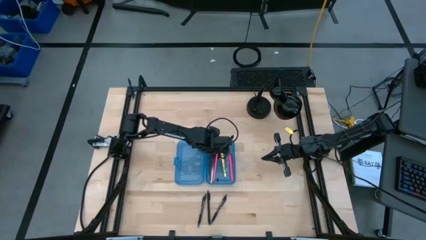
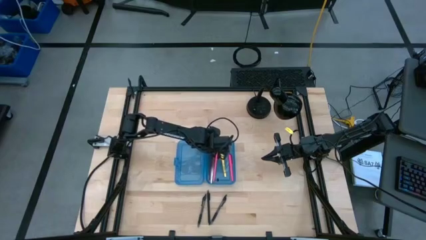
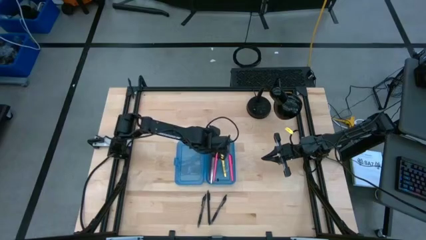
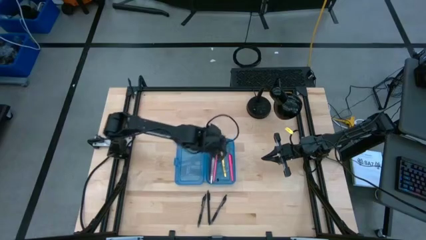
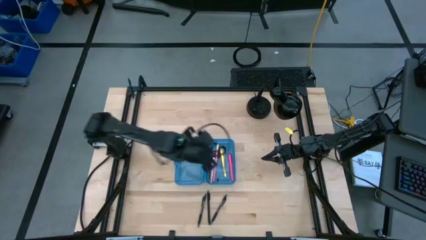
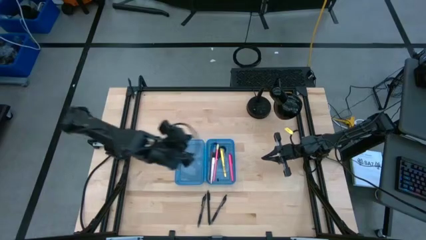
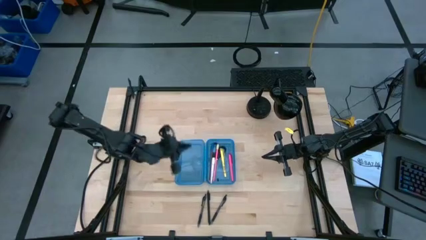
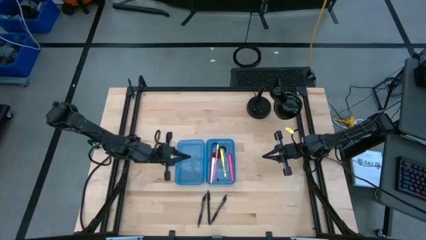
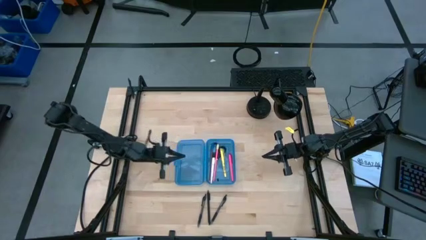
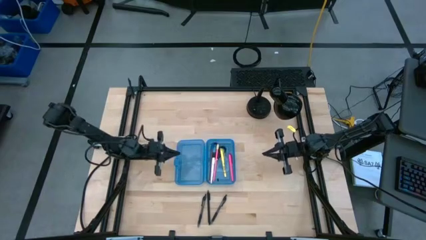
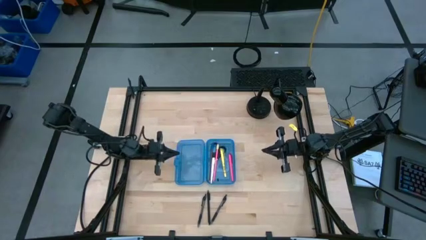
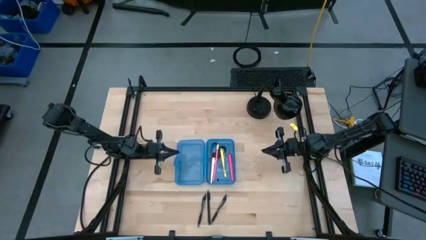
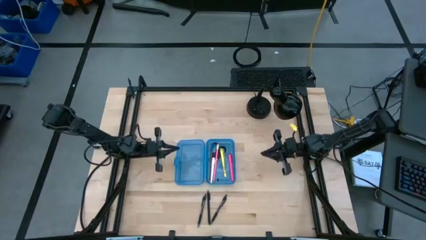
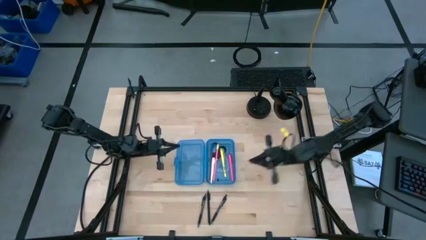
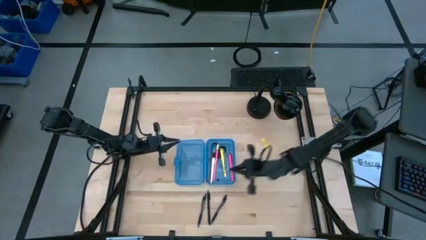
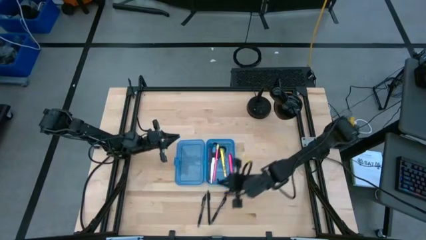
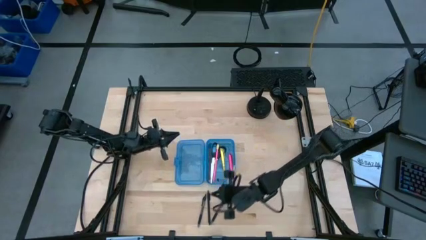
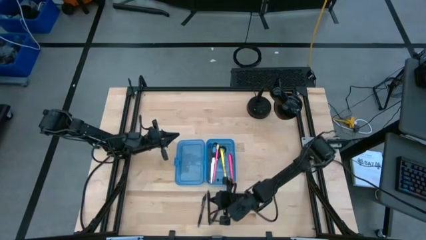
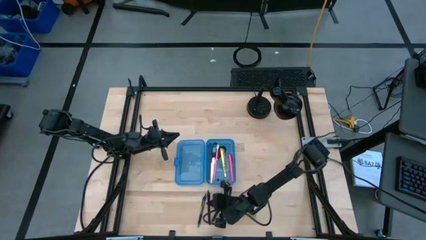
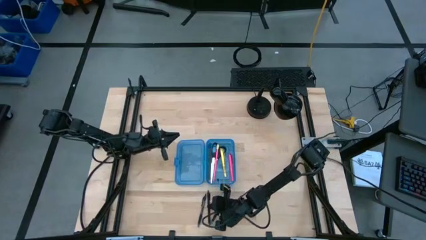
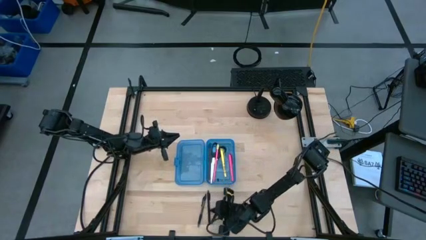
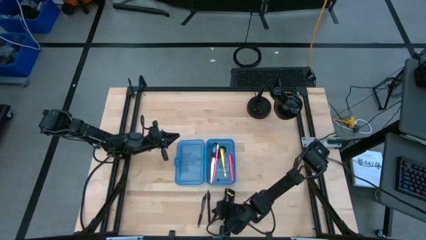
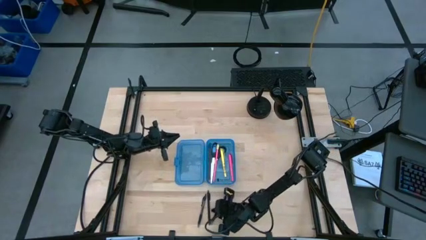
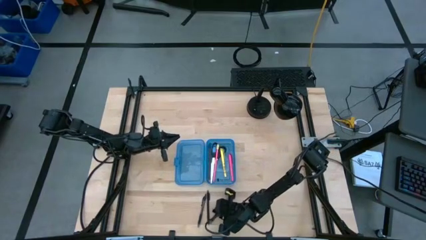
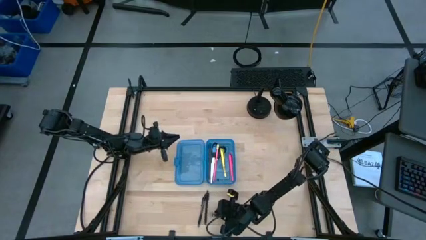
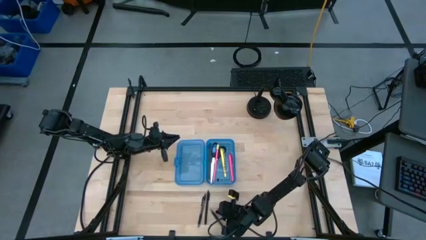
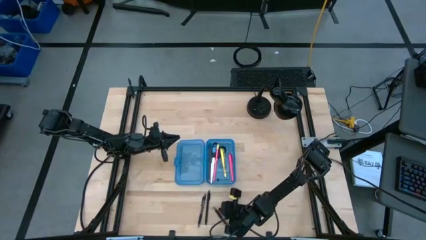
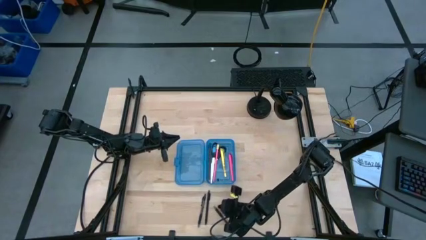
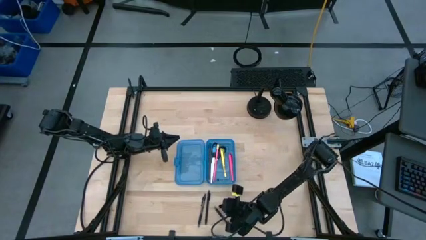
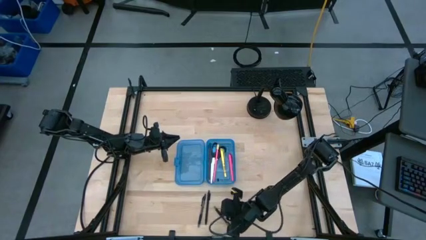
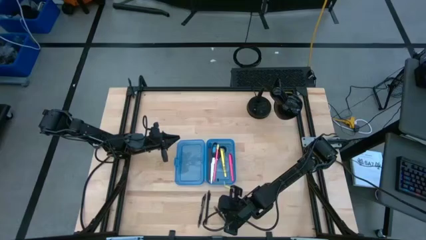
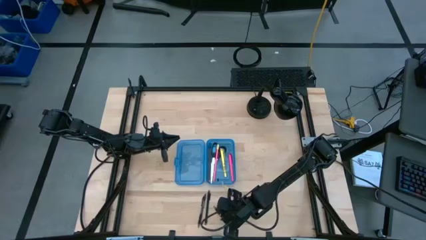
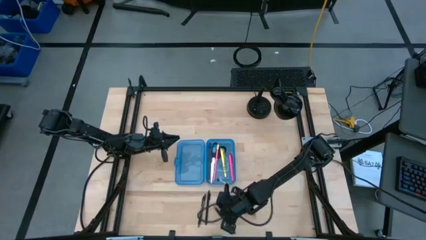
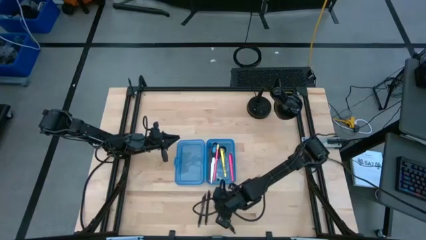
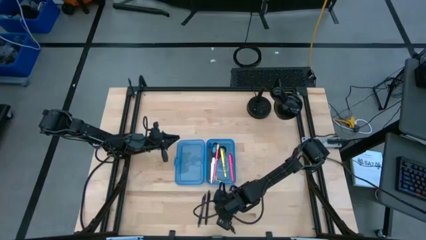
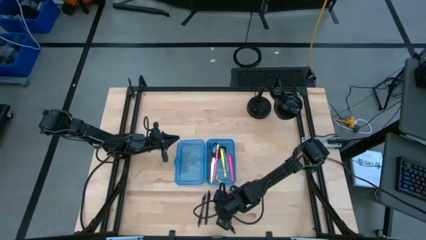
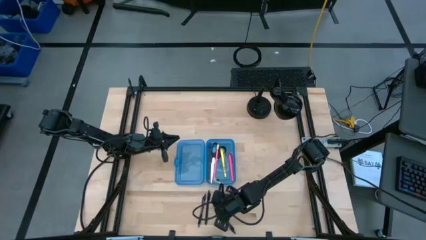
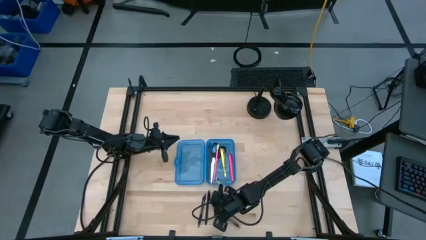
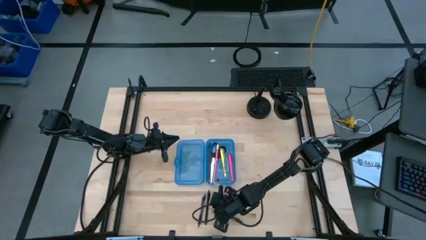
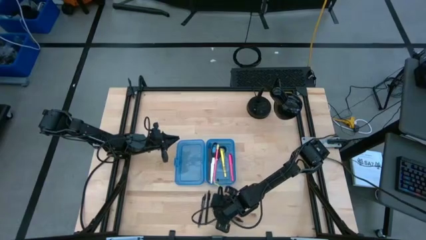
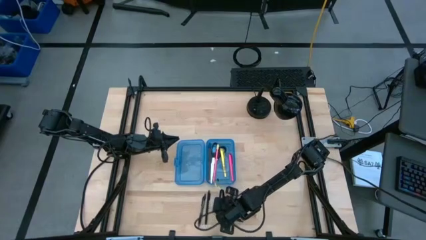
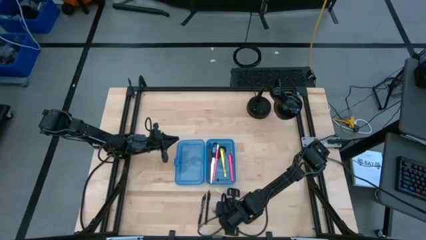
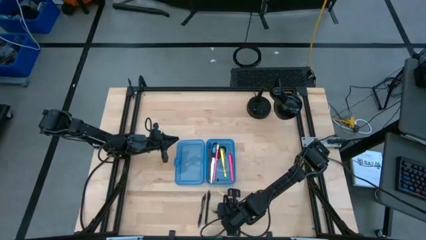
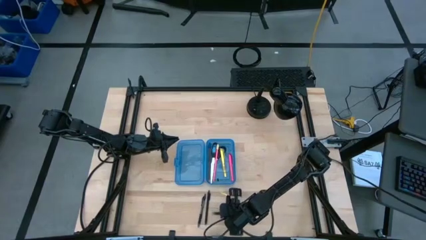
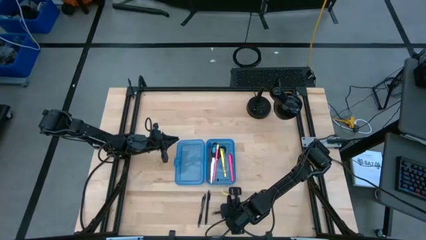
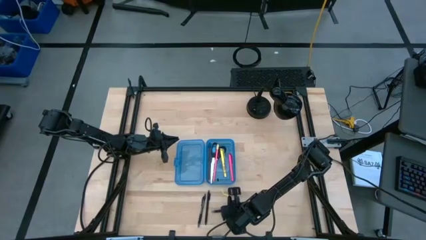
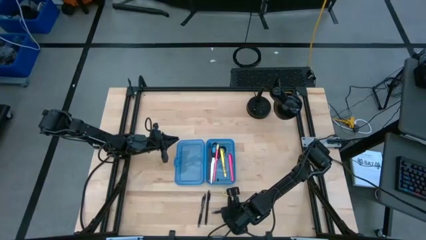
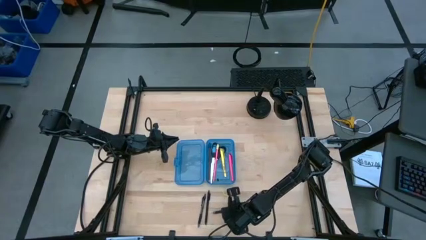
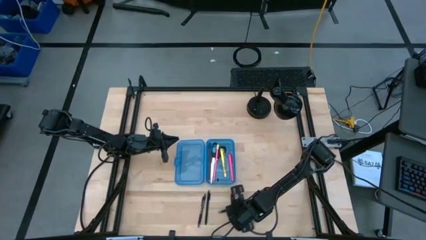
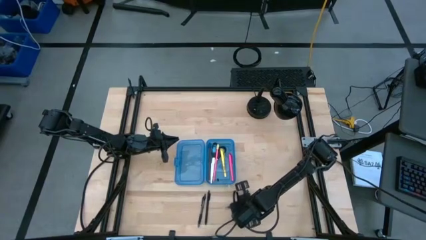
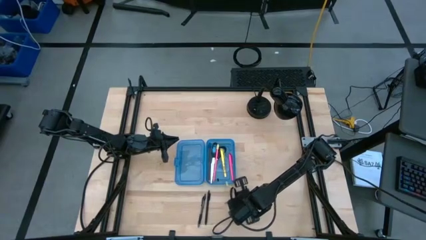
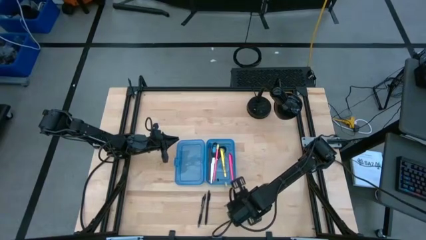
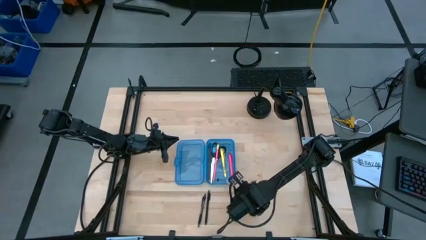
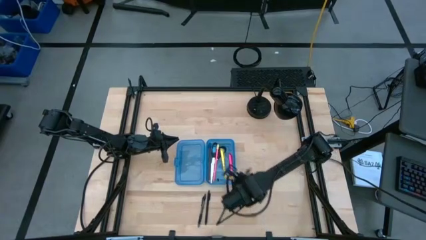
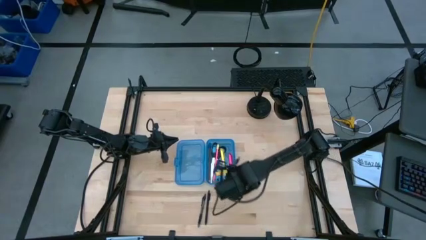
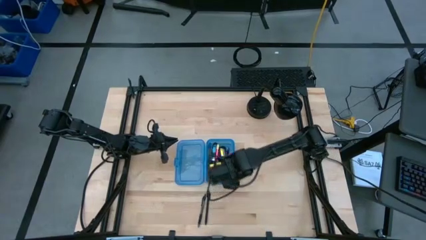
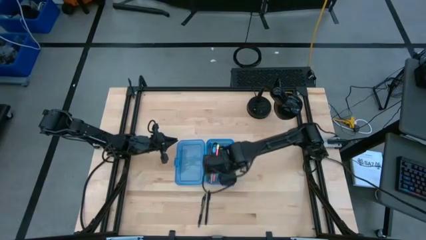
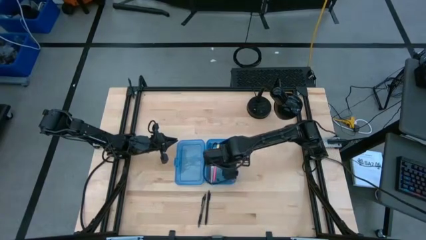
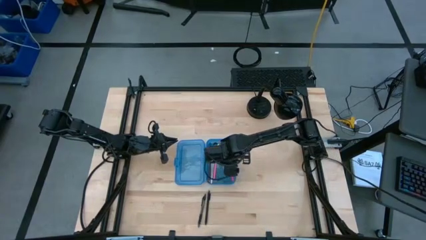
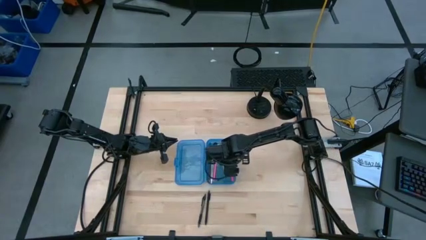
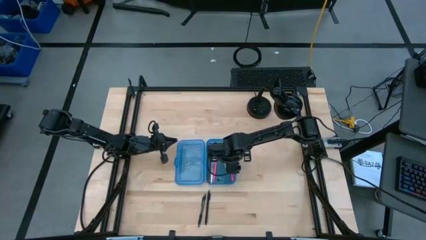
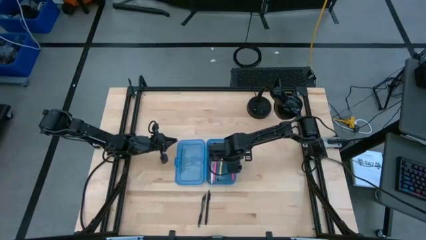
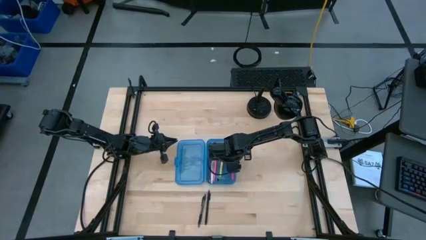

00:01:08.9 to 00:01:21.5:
Task: Pick & place school supplies into a supply box
Put the right black pen into the blue supply box

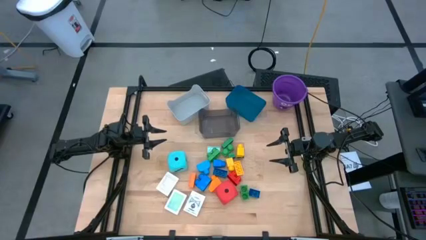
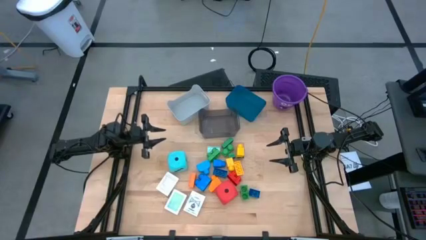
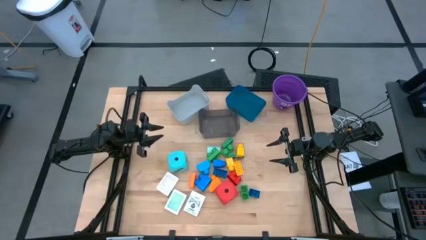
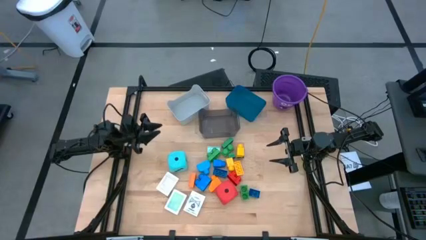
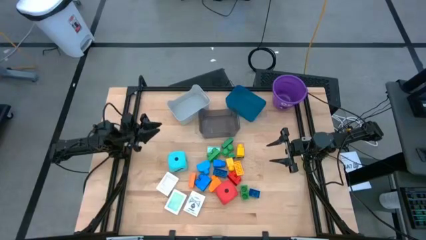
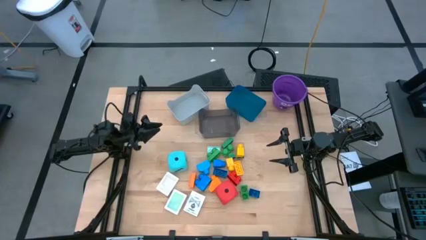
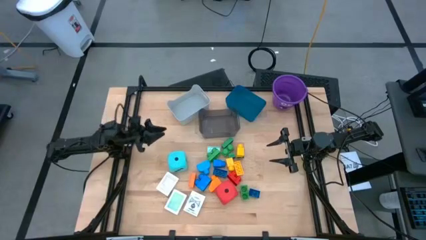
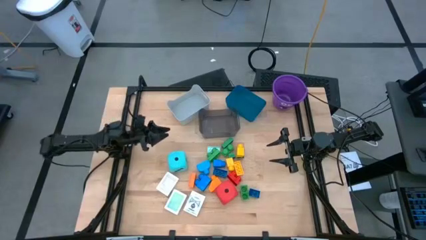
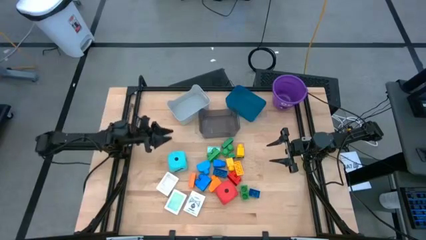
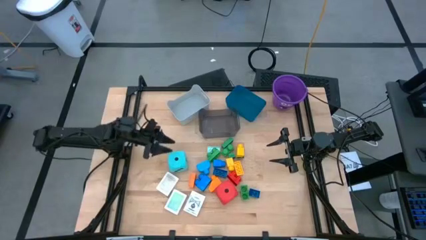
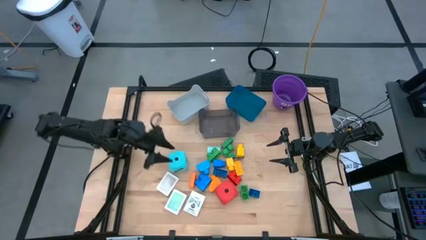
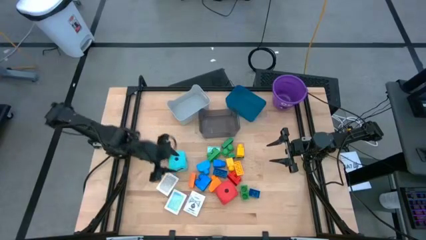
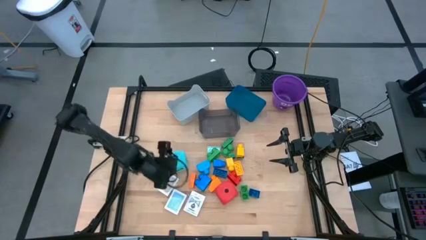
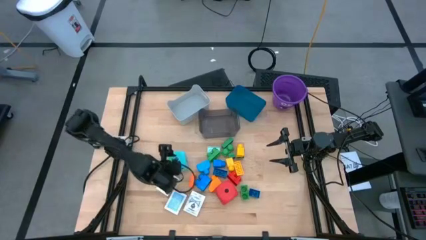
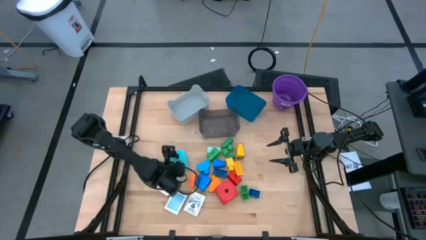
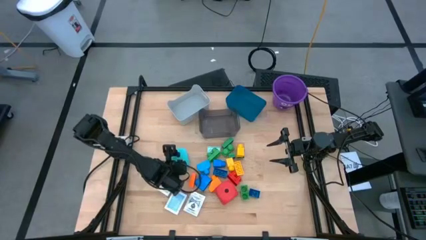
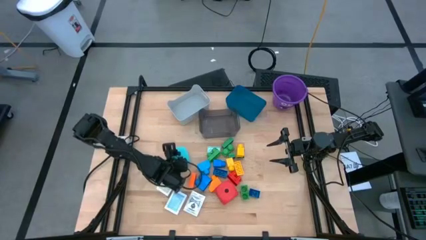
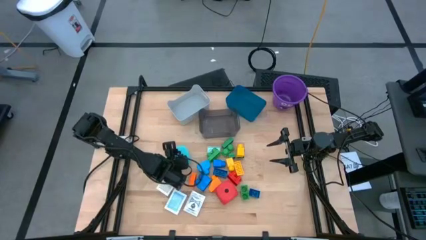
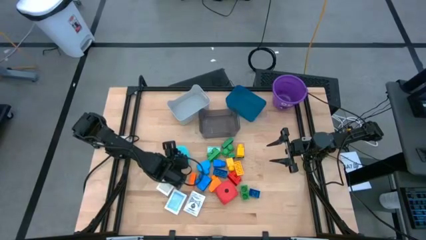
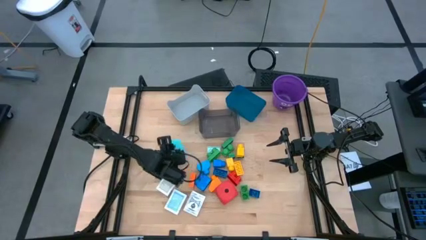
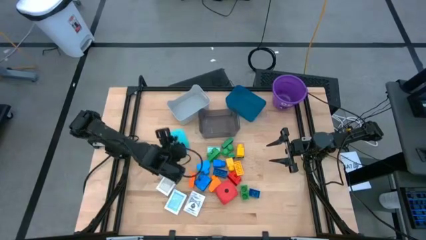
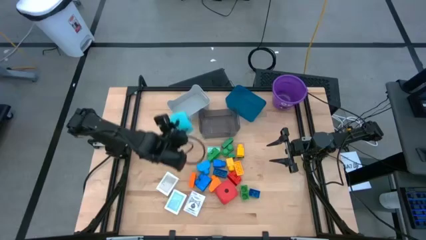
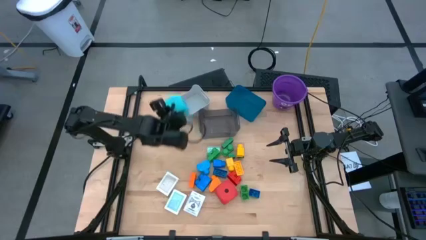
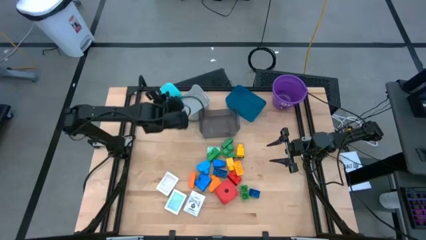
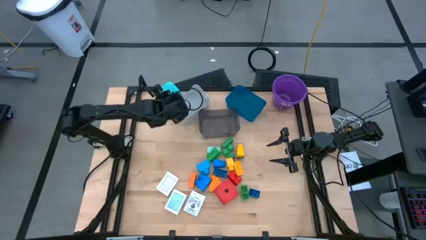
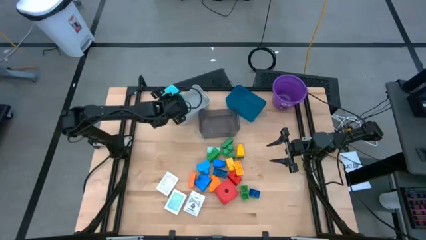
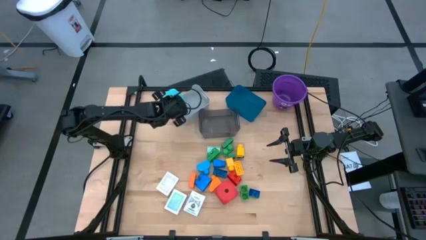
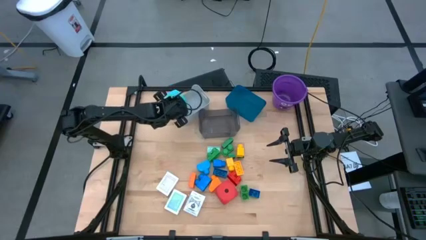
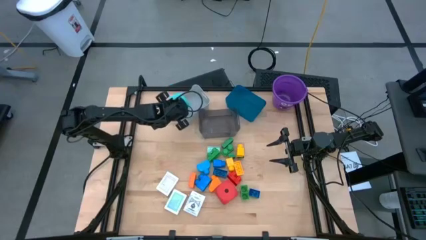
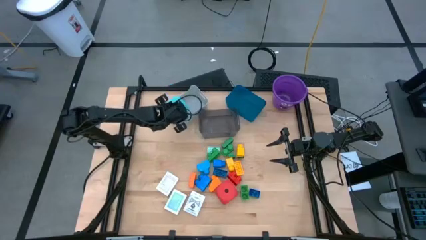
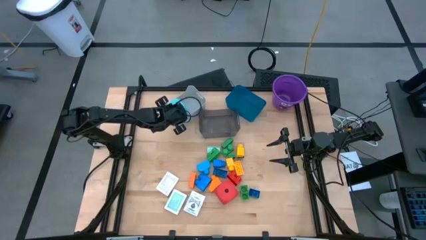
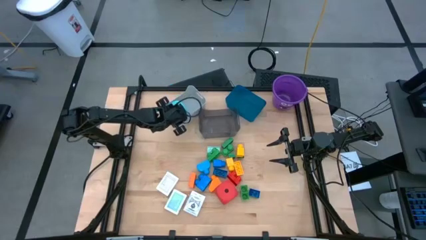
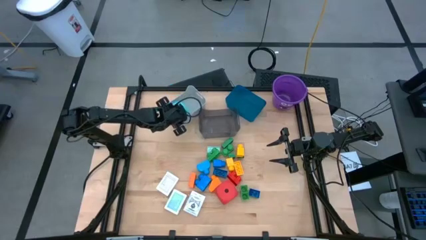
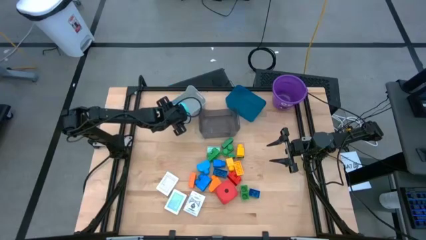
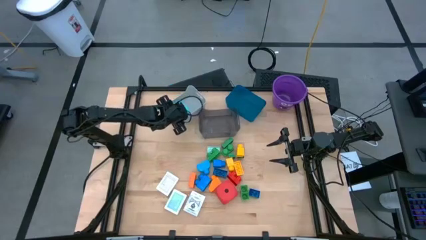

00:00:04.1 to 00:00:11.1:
Task: Pick & Place Toys
Put the blue die into the gray bin
